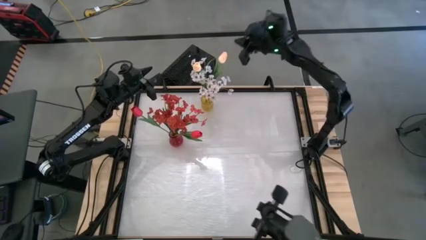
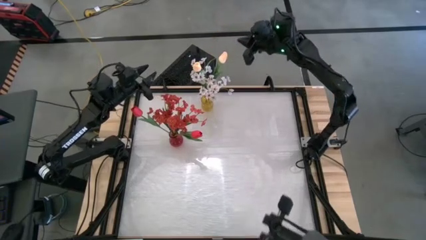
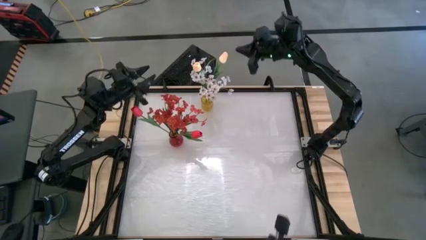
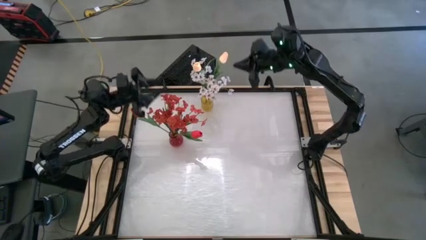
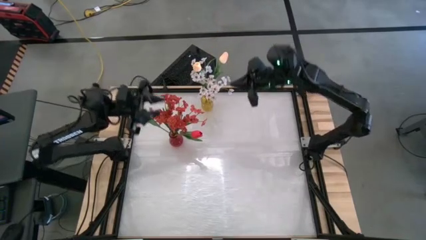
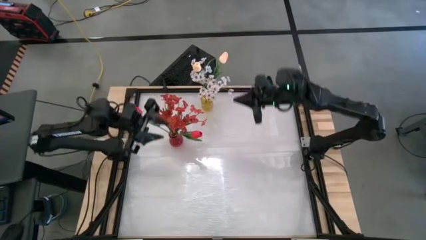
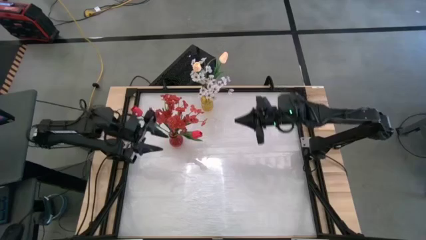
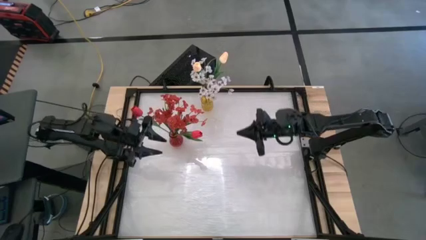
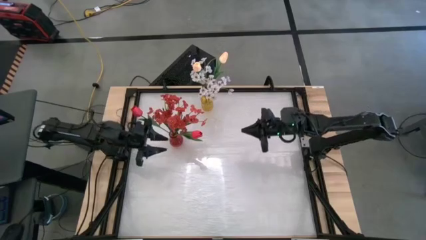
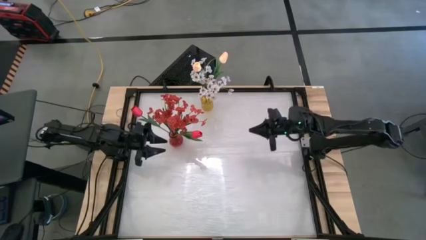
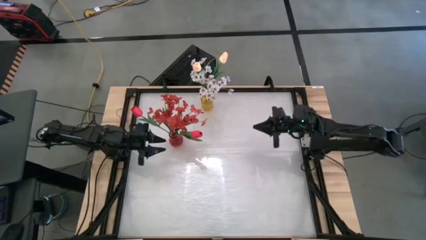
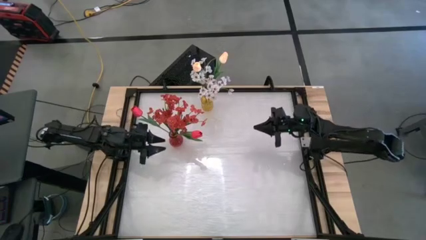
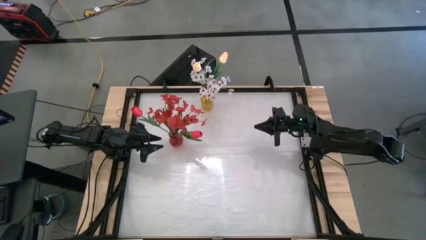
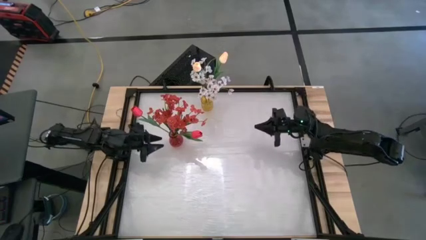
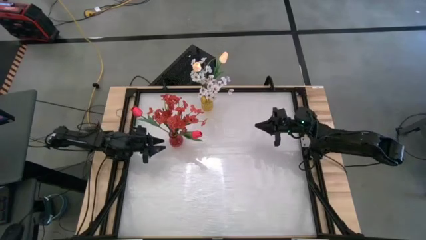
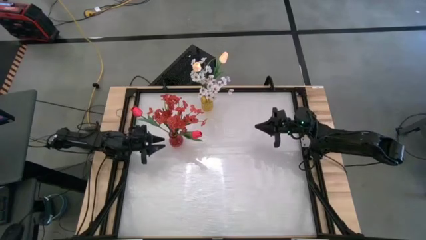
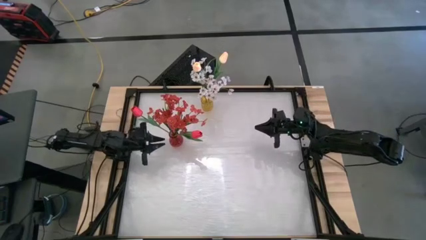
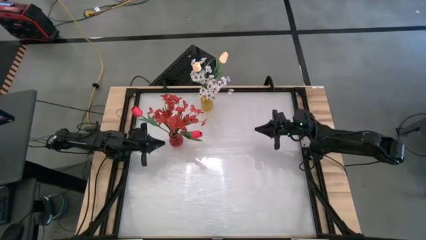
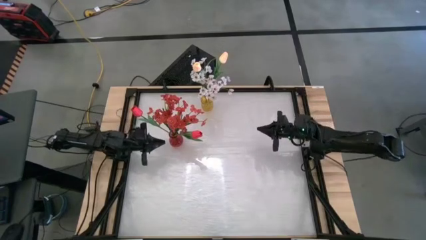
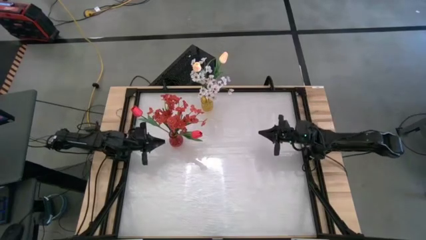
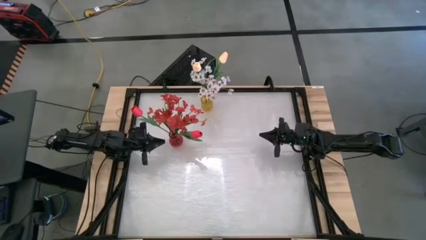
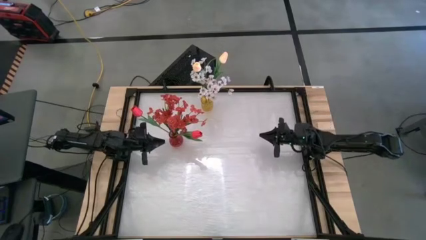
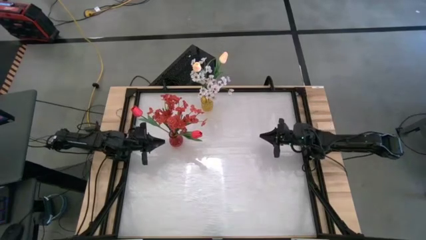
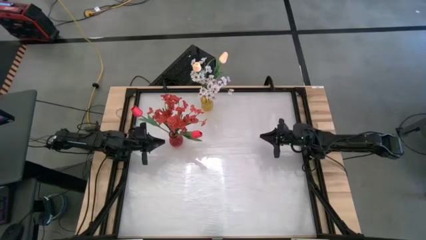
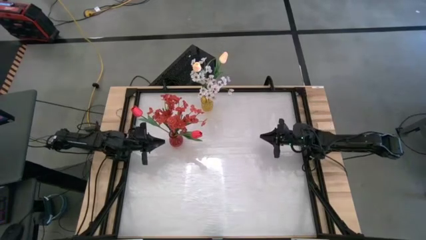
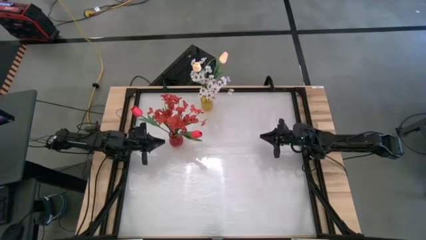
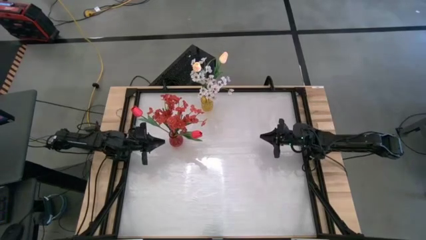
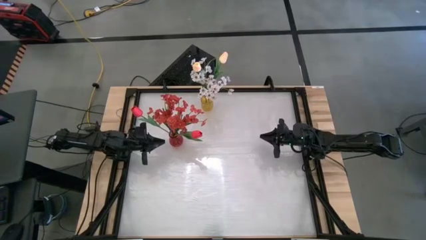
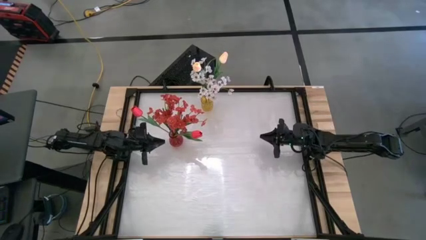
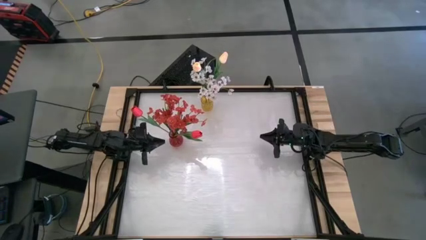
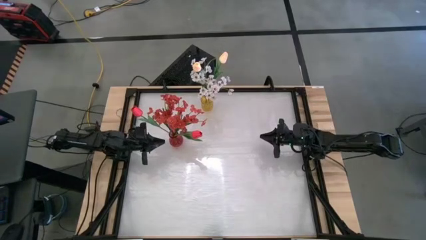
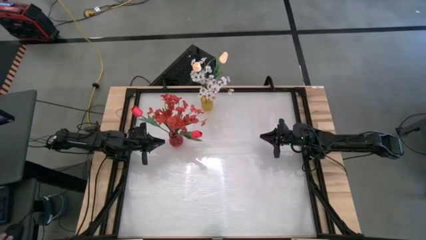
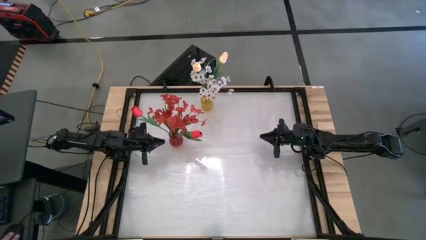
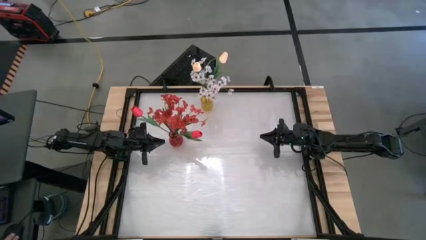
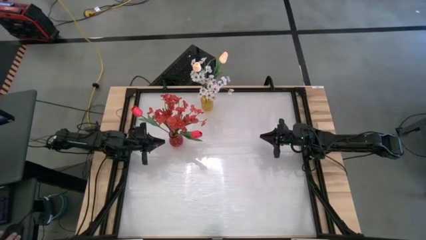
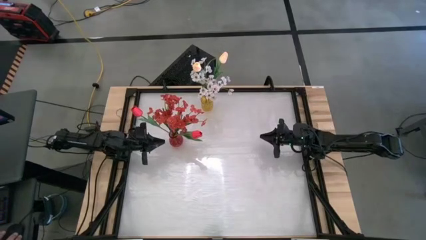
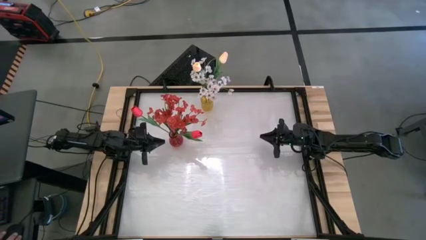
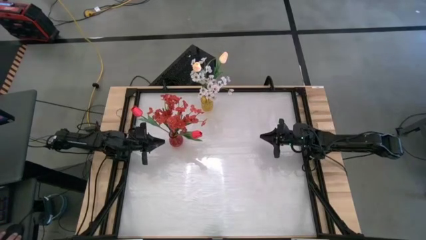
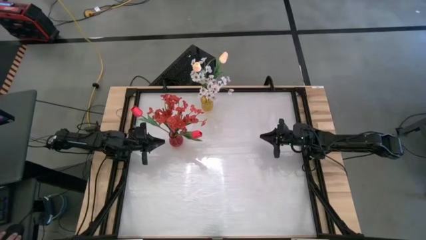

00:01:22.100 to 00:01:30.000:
Task: Sort flowers into vase by color
Return to Home Position

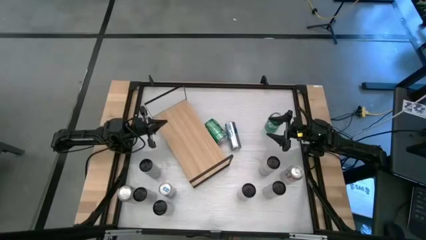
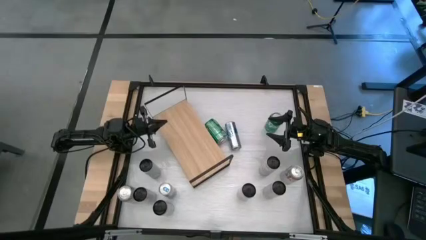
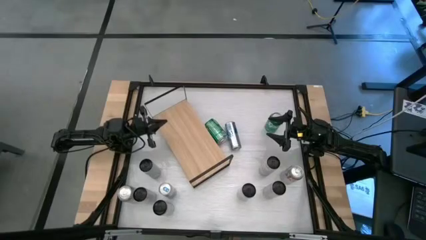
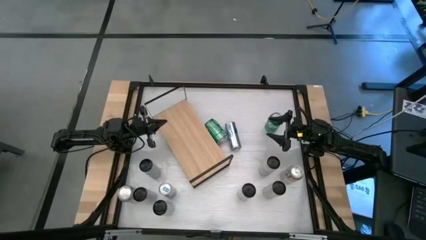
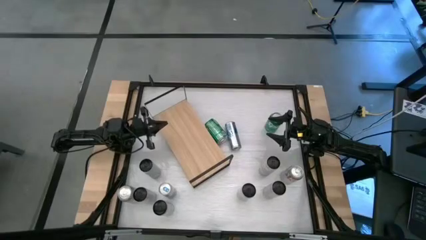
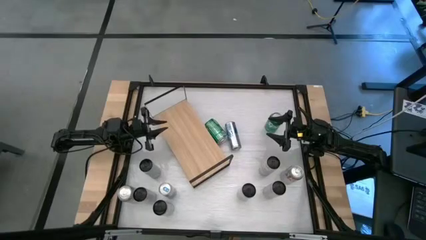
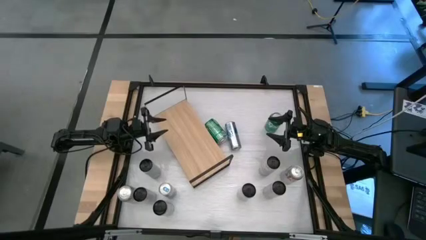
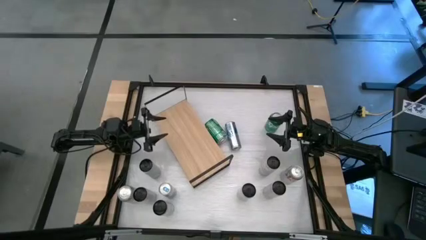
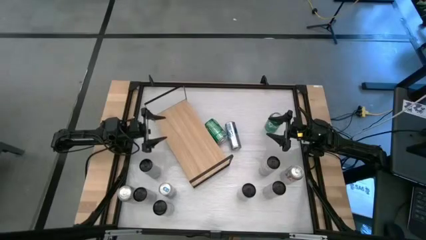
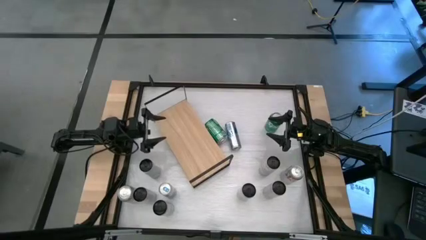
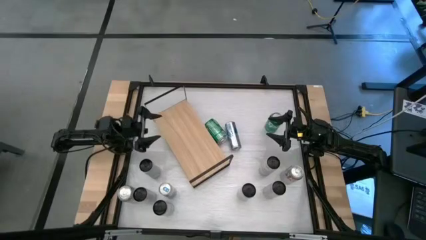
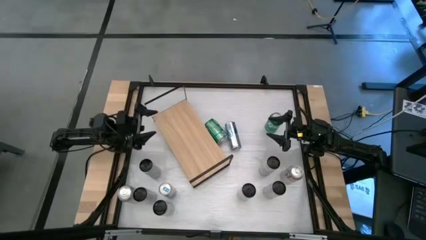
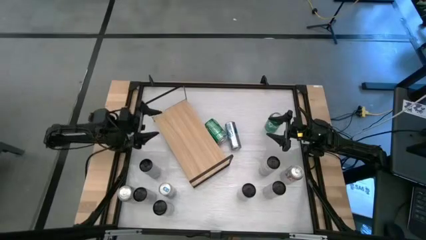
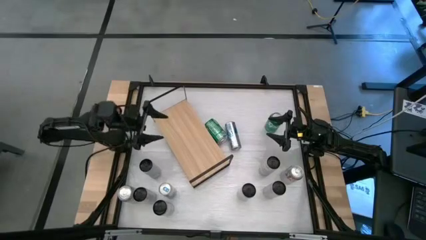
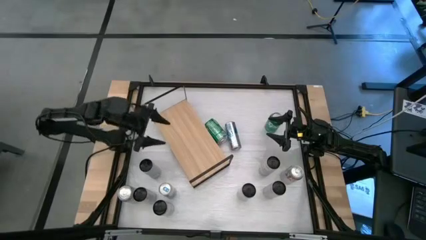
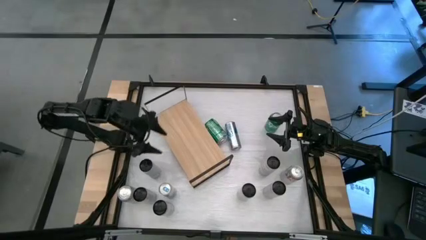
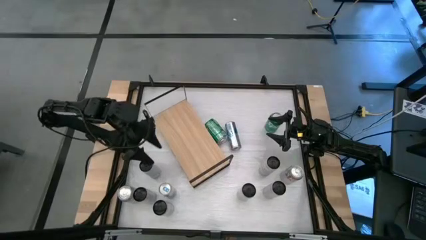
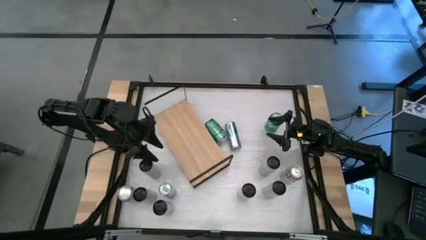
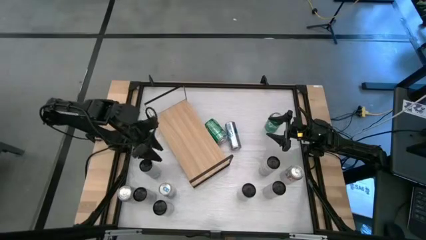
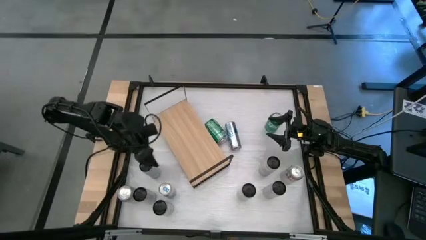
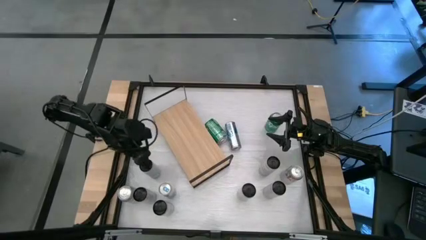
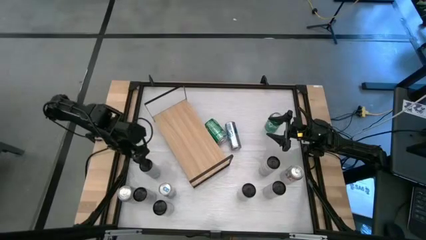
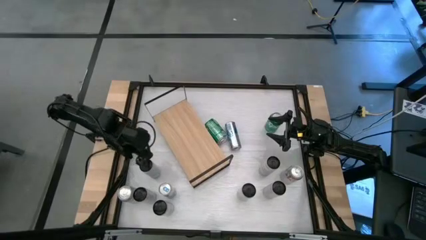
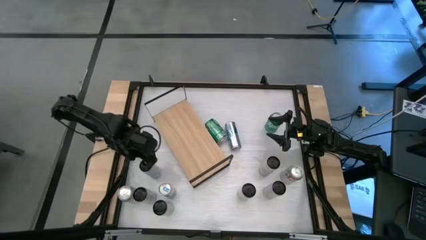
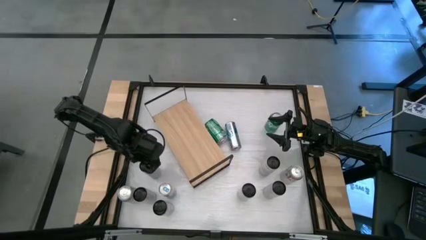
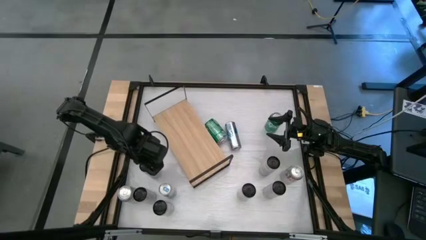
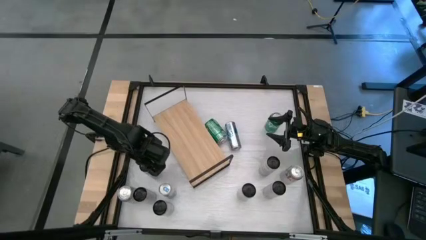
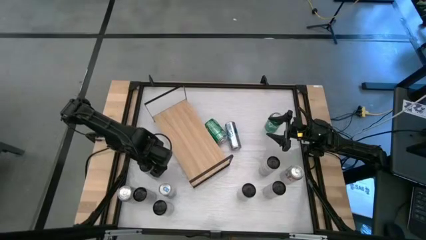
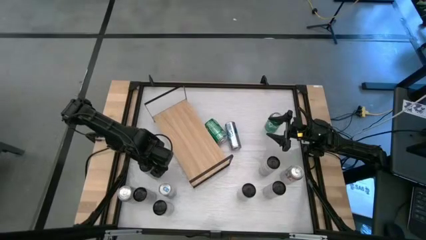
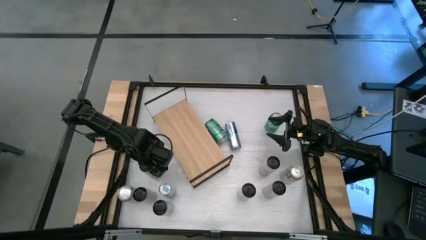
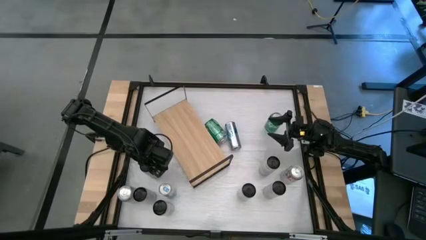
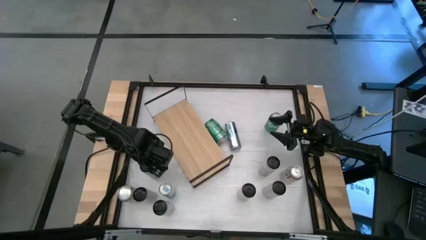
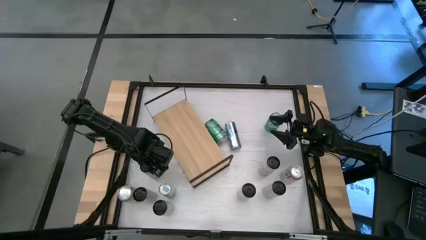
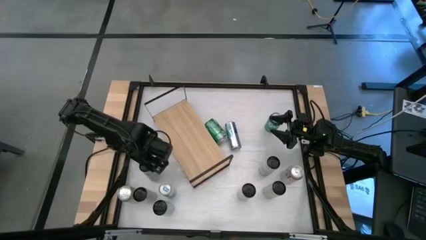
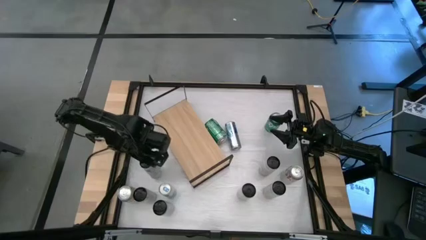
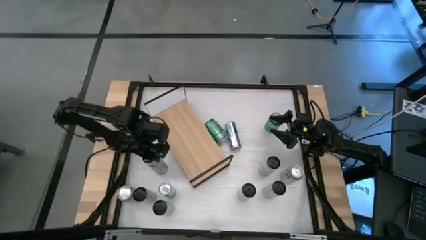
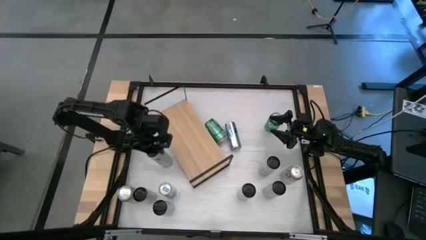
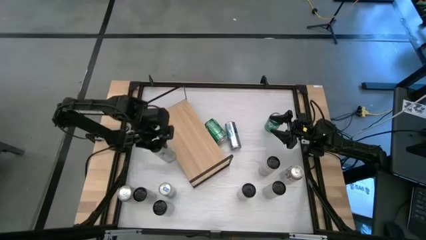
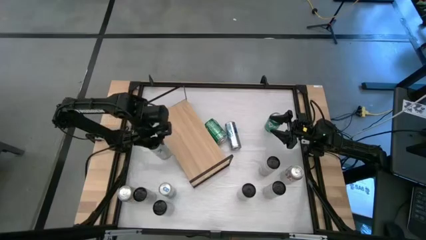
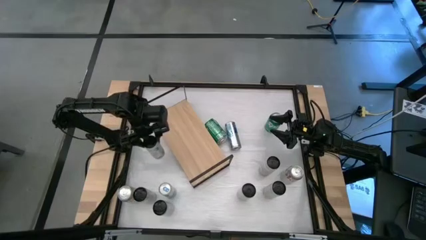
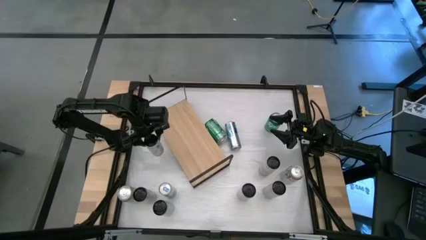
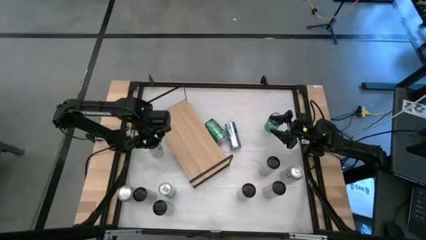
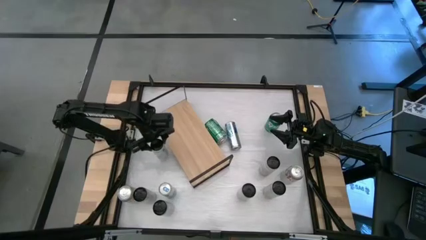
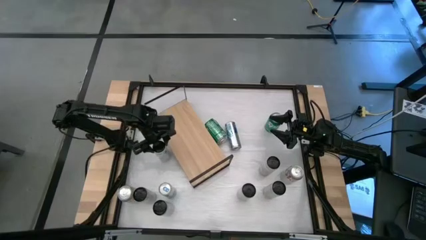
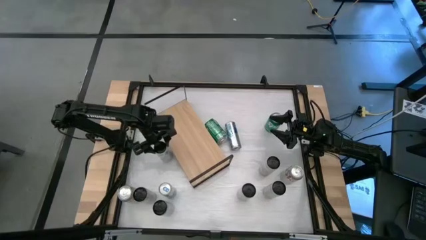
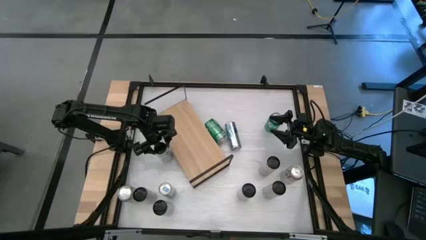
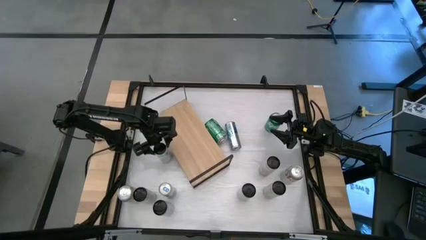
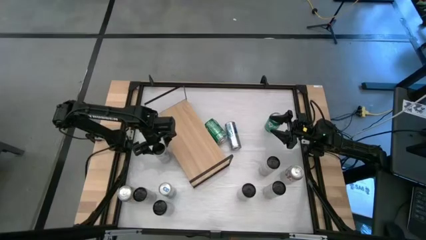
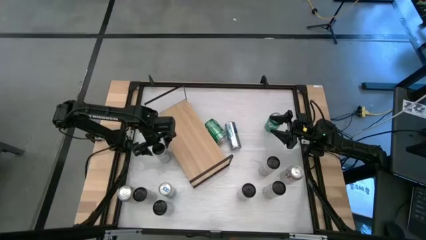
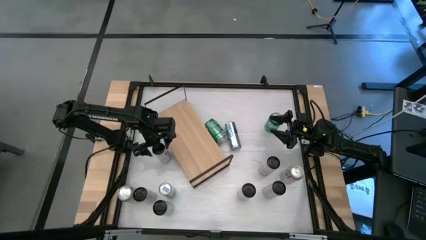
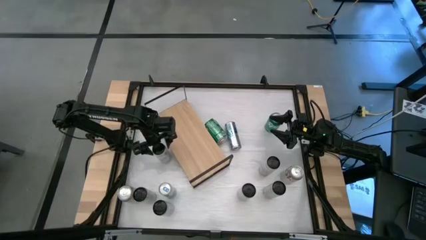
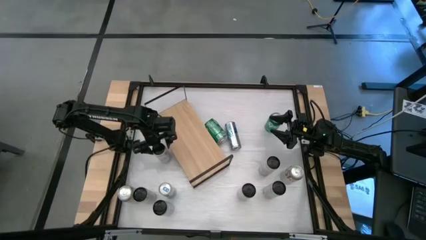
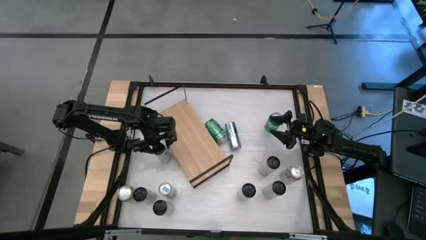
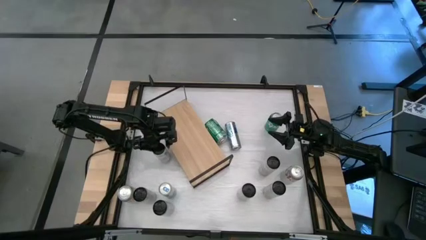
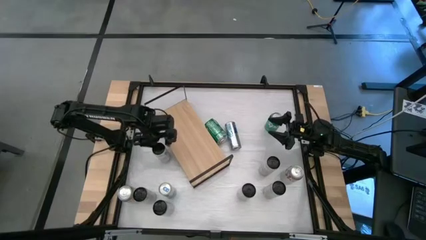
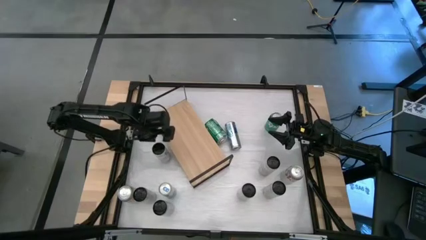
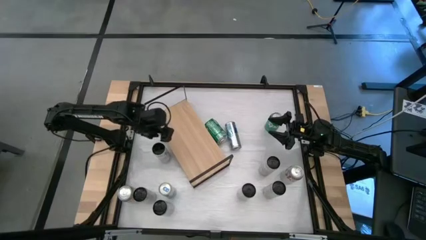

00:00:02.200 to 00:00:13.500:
Task: Place canned beverage on shelf
Put the white pink soda can on the shelf
